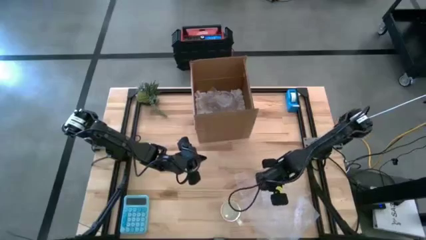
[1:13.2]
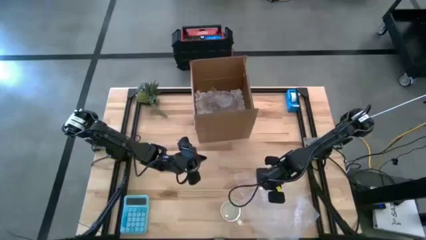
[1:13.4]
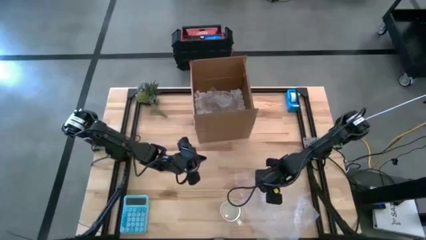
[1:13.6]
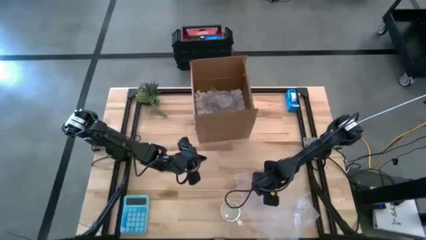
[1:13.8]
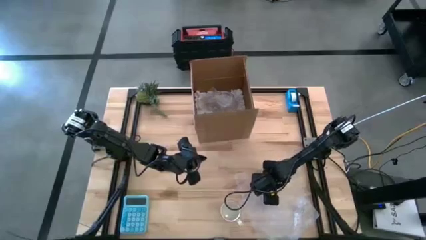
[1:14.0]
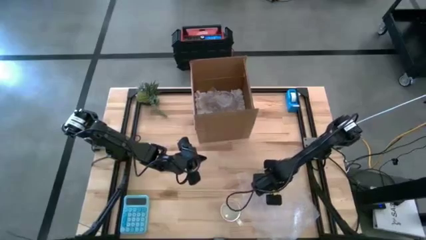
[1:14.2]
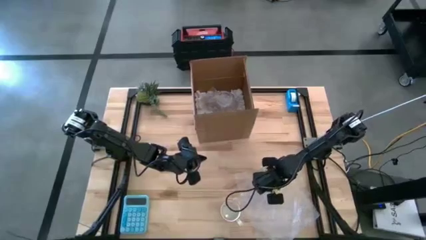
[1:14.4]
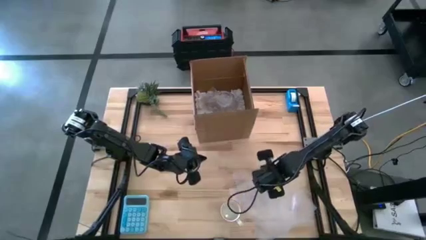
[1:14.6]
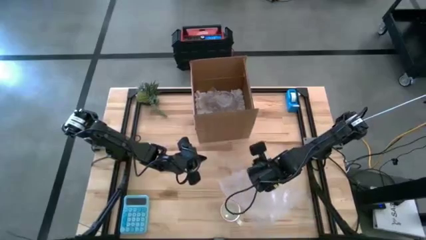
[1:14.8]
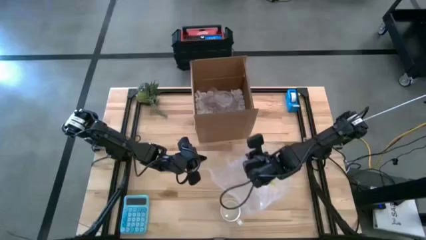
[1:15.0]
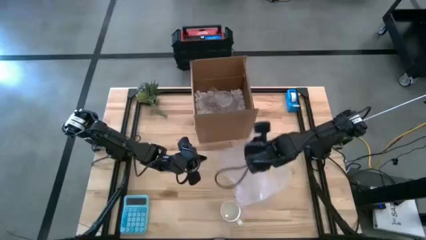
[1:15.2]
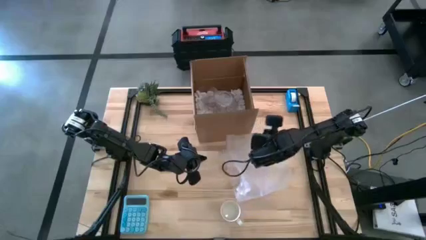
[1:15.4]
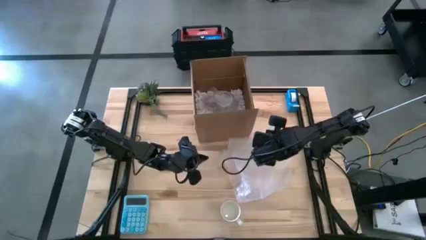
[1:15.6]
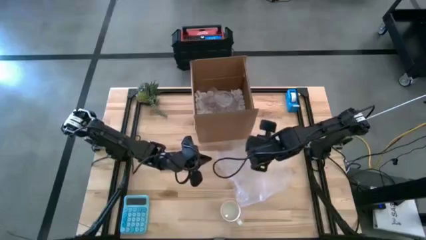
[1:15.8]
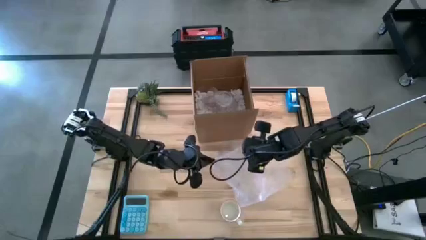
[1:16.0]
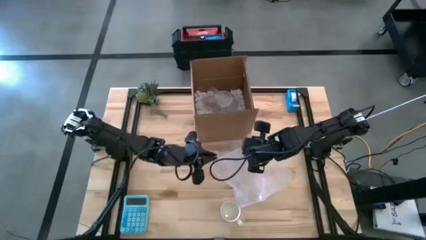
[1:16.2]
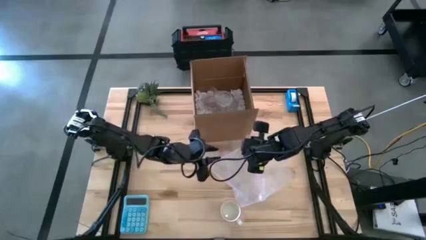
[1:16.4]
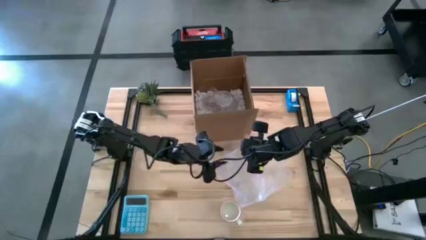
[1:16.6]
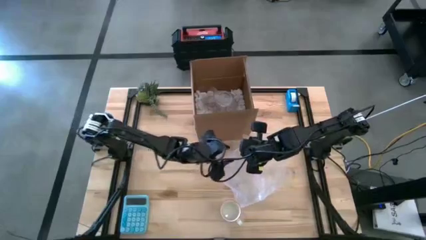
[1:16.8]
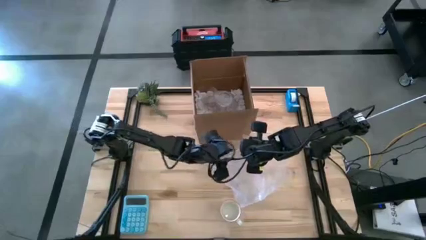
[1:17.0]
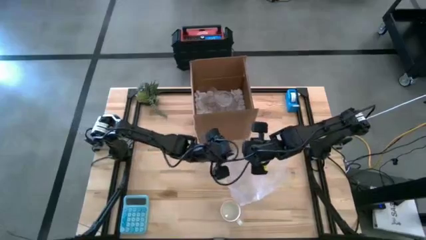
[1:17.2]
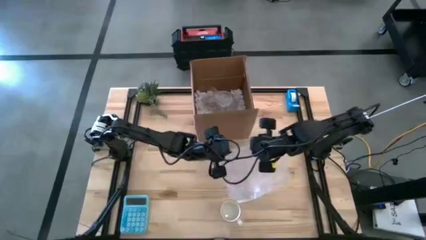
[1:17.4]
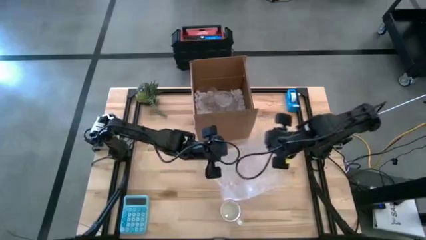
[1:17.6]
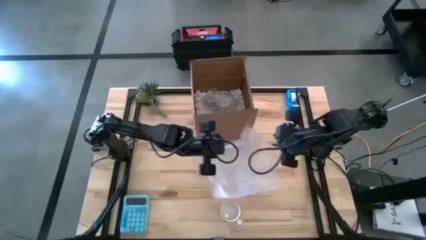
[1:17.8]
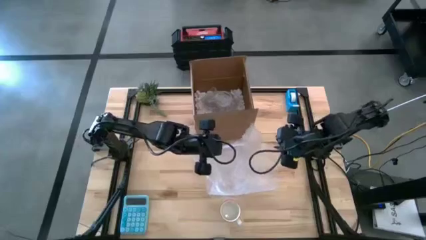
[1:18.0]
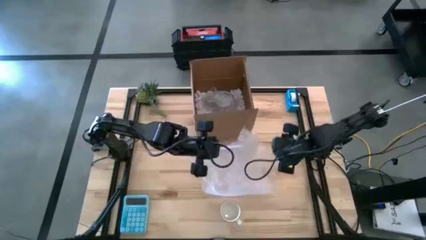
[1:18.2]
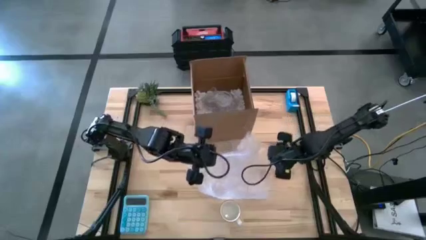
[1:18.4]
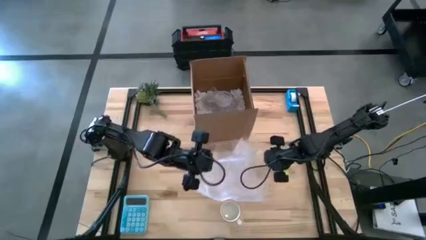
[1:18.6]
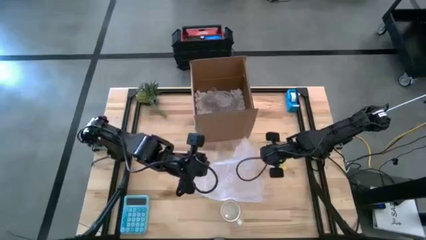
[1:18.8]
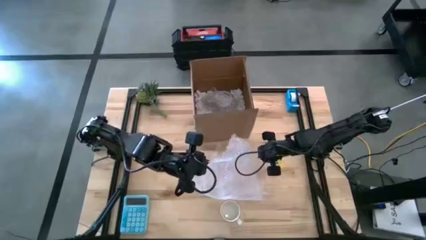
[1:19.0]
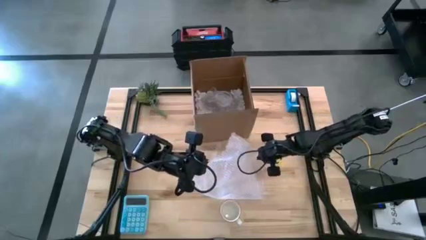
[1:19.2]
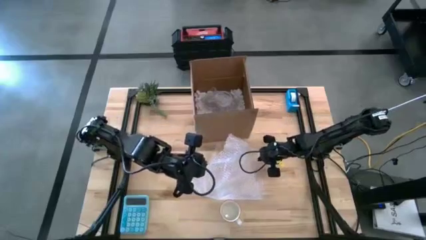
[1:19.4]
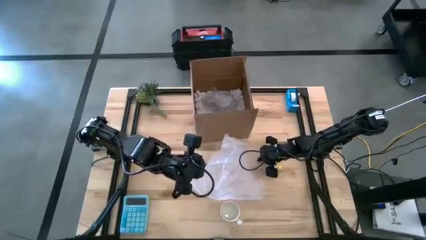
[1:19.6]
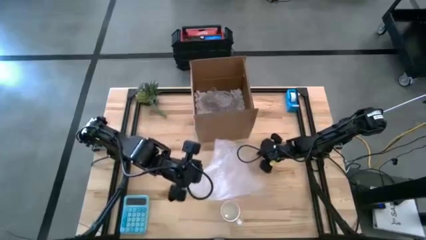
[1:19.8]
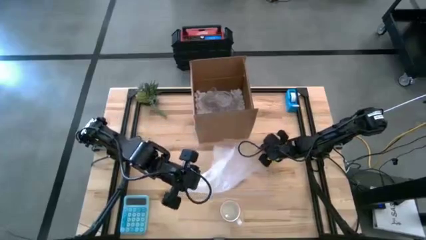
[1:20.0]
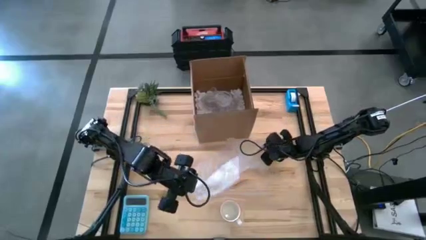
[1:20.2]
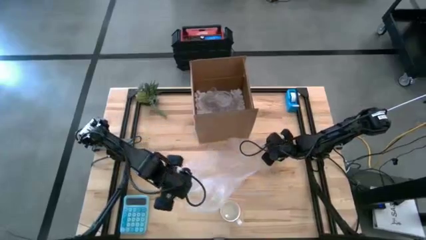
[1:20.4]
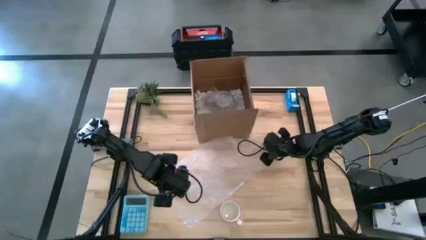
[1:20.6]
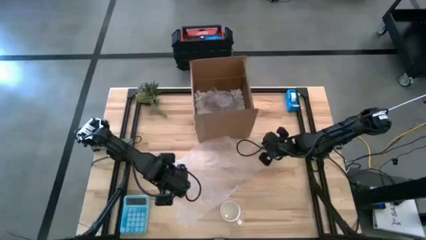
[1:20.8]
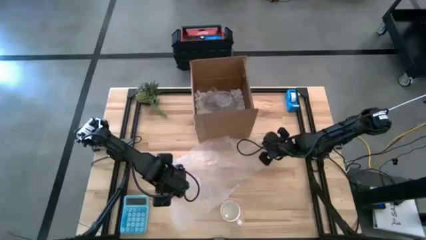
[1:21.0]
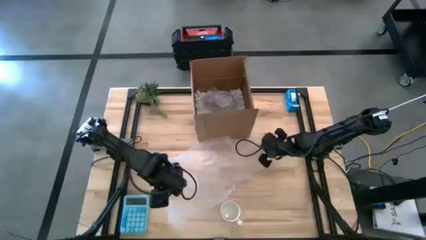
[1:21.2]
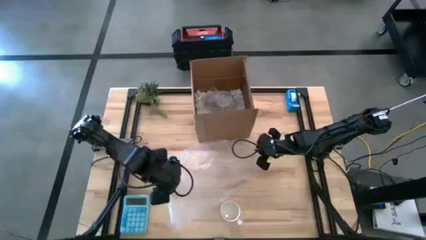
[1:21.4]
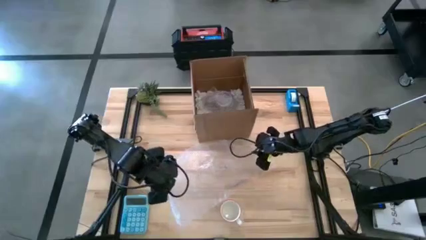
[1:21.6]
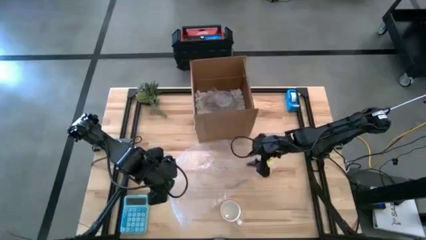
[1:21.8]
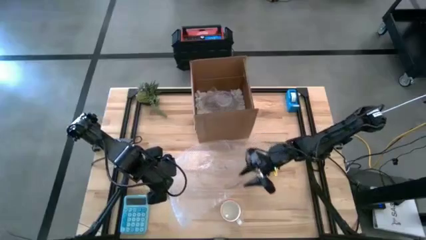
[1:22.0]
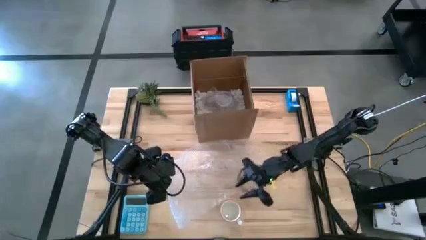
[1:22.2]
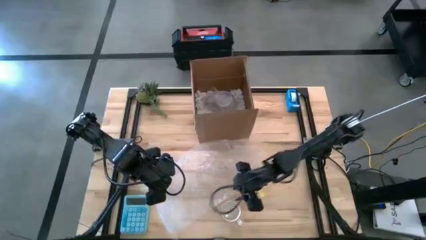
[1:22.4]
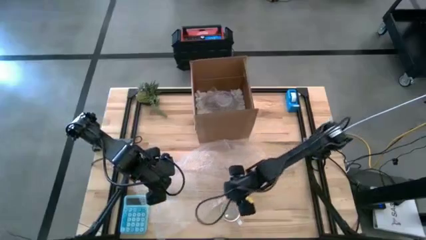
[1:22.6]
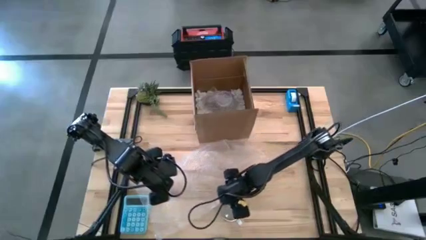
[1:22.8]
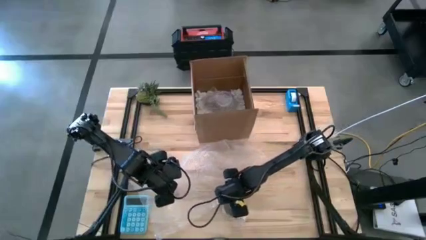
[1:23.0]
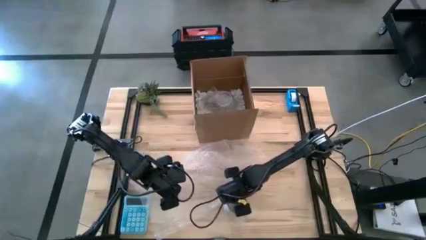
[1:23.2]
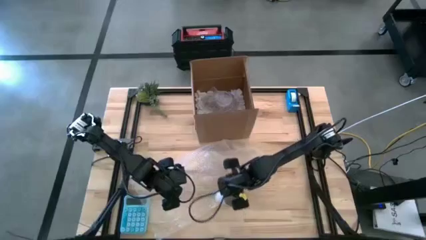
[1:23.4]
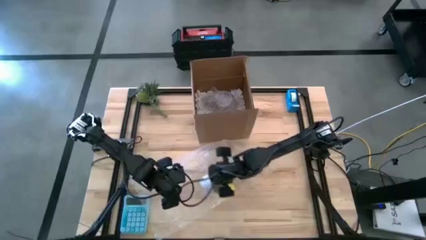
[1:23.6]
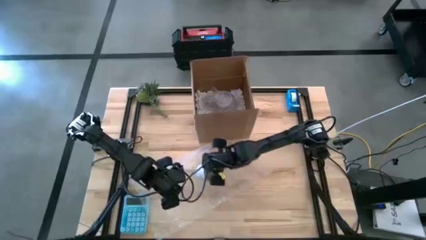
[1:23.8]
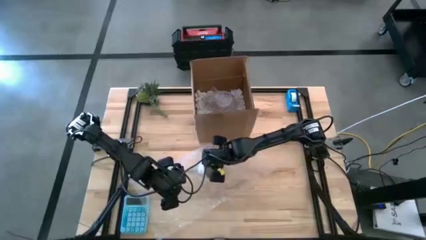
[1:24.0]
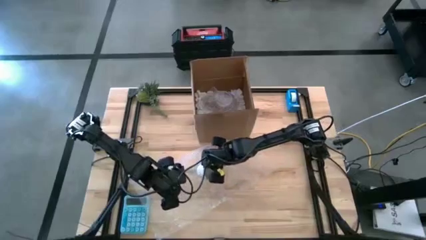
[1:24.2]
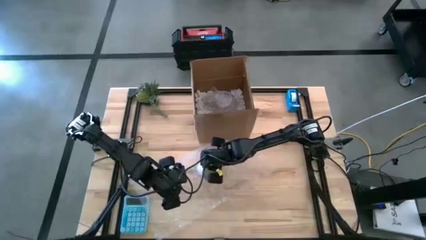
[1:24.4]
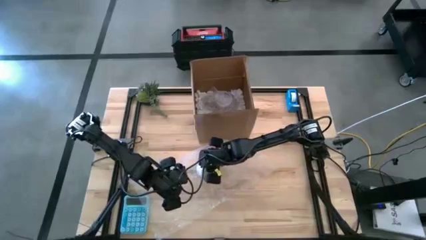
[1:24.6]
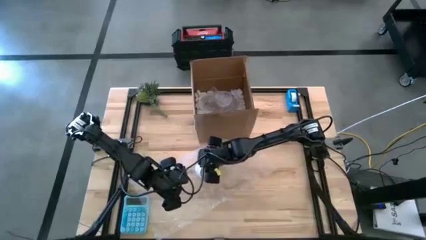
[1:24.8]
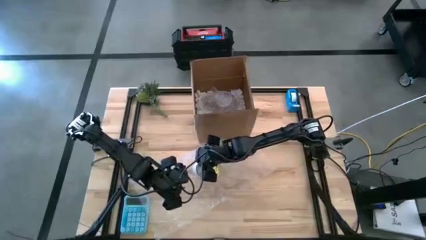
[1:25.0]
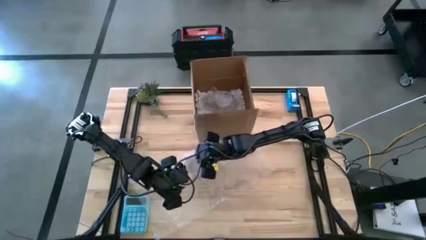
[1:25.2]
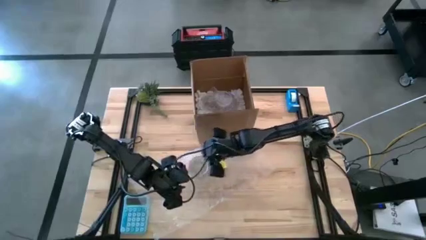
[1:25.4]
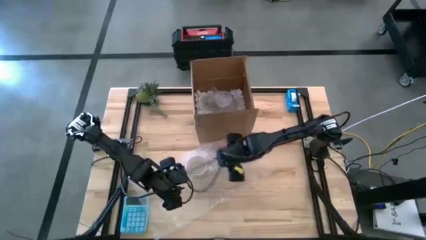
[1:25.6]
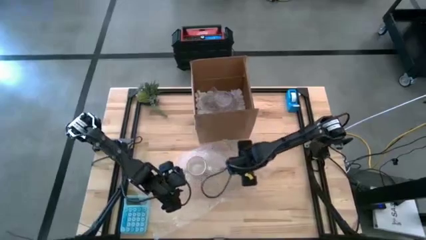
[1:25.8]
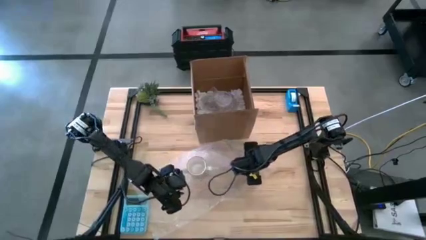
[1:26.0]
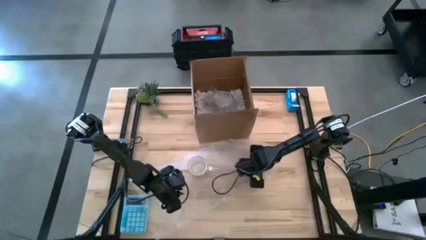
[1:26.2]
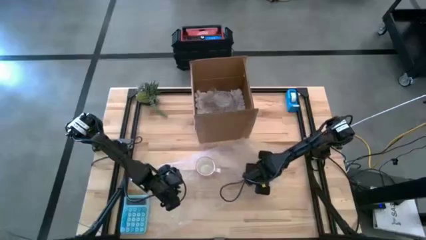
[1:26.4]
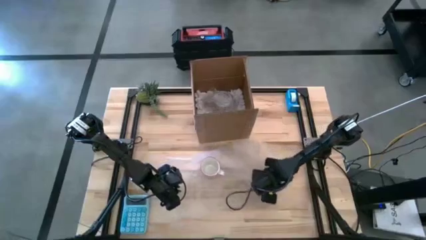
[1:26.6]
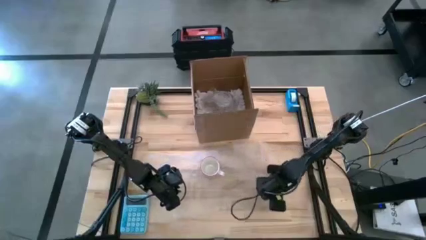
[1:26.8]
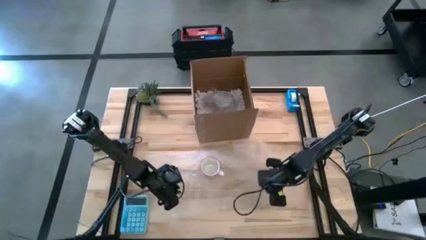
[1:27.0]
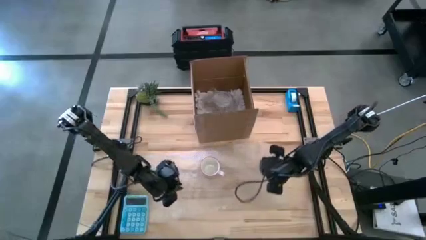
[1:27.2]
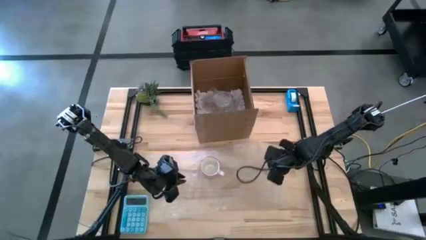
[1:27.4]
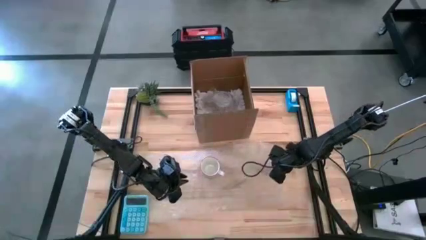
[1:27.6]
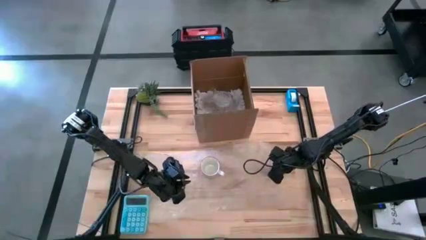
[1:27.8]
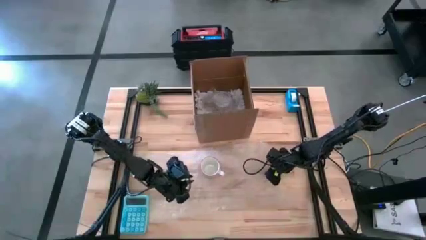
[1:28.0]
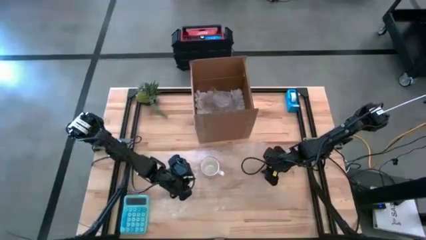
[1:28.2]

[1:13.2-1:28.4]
Task: wrap mug
Wrap the gray mug with the bubble wrap

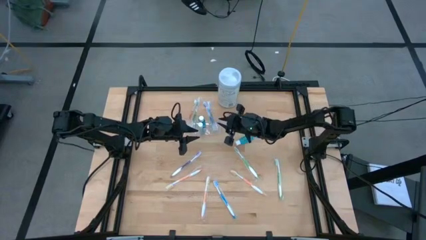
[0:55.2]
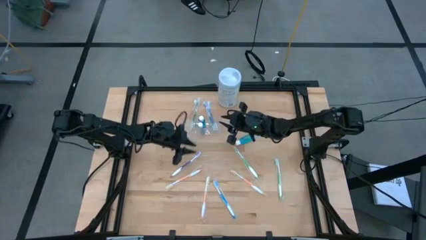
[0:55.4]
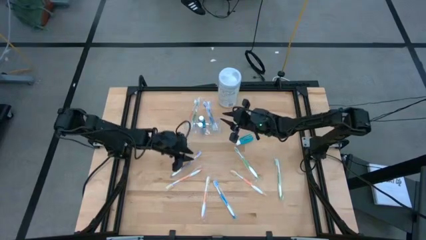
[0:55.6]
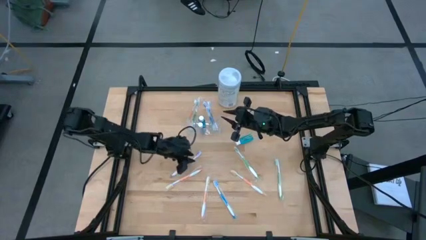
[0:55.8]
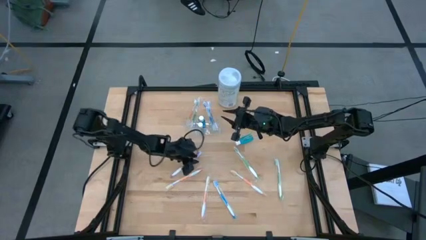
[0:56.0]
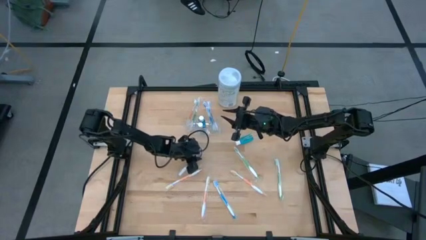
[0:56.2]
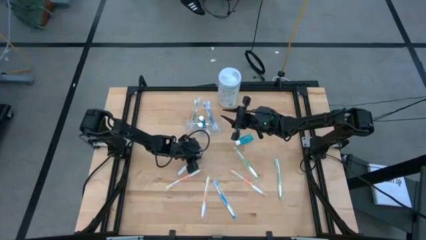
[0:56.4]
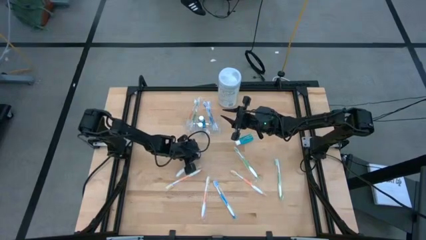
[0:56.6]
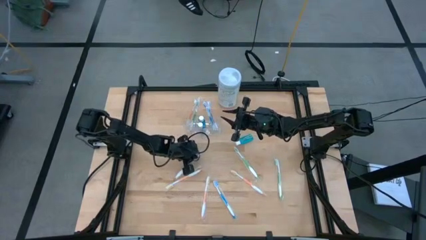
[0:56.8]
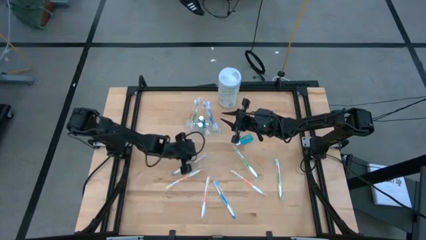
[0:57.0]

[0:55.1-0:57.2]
Task: Pick & Place toothbrushing station
Put the purple toothbrush into the transparent organizer
